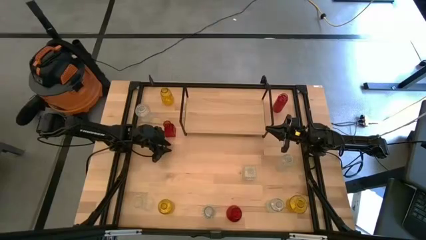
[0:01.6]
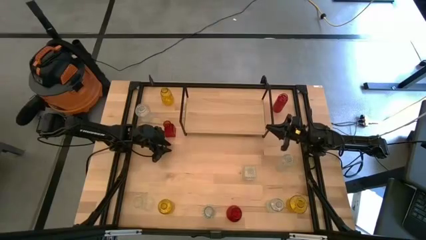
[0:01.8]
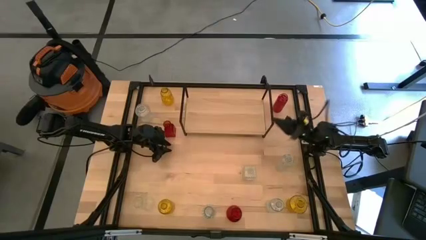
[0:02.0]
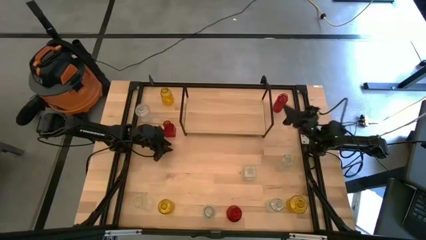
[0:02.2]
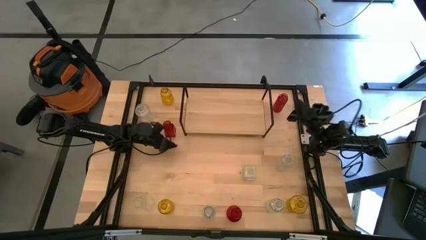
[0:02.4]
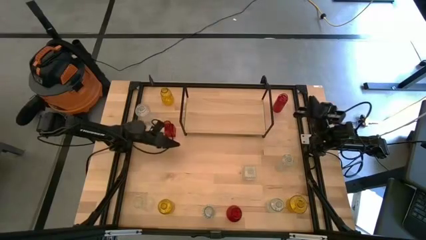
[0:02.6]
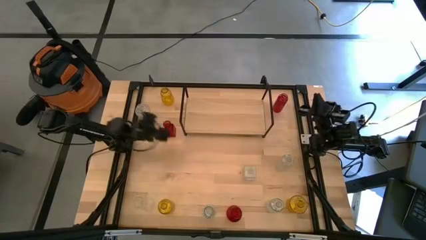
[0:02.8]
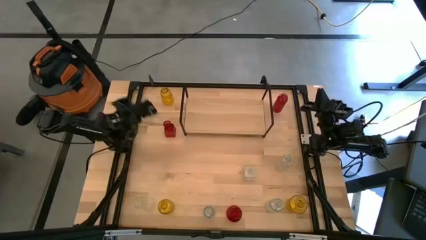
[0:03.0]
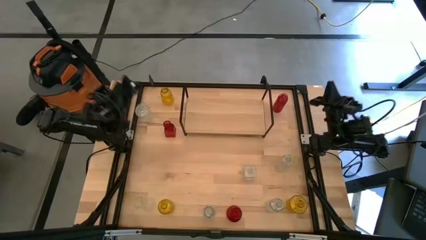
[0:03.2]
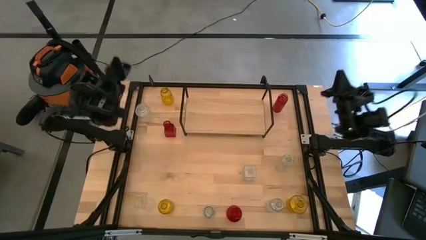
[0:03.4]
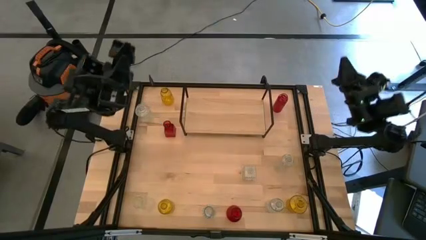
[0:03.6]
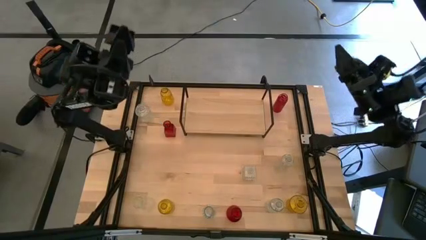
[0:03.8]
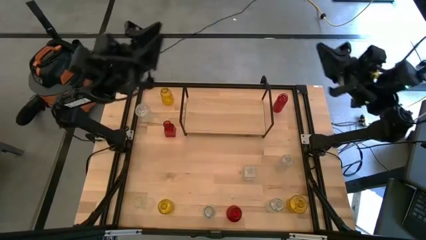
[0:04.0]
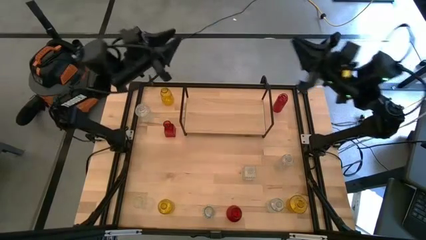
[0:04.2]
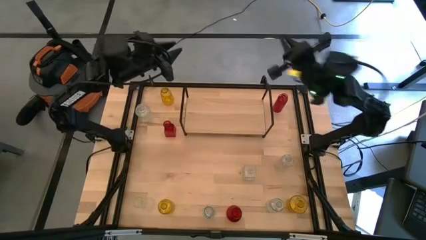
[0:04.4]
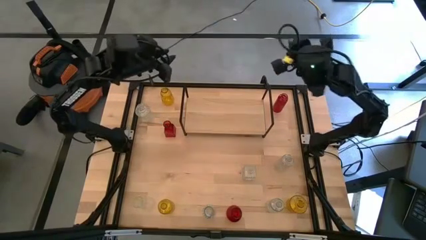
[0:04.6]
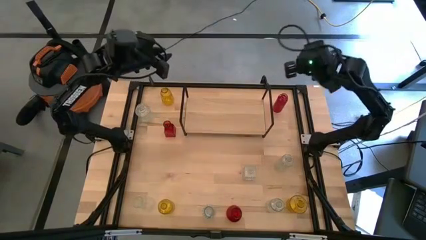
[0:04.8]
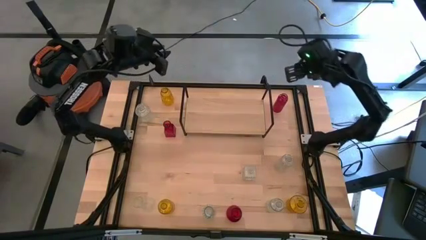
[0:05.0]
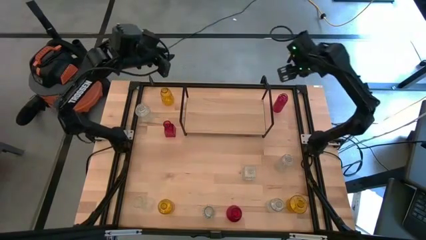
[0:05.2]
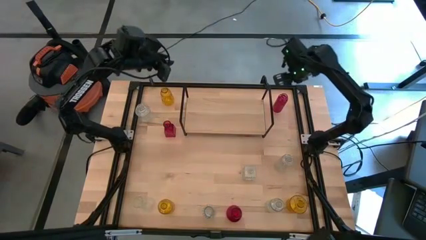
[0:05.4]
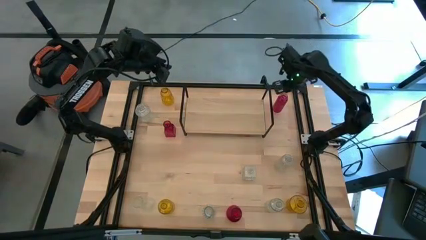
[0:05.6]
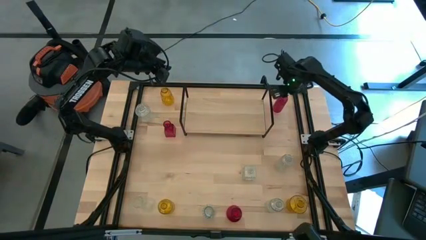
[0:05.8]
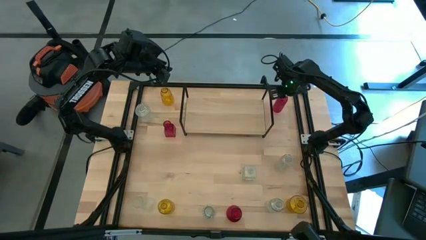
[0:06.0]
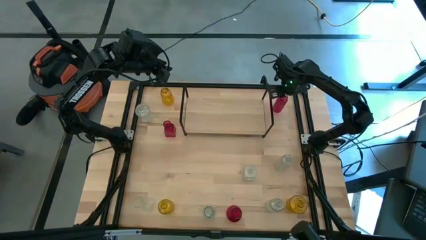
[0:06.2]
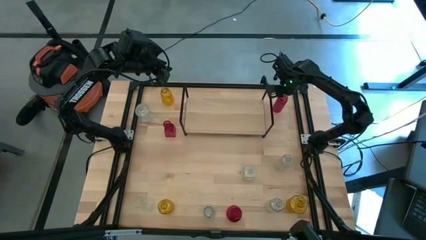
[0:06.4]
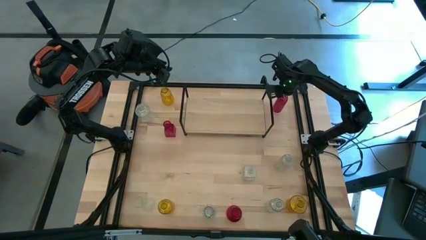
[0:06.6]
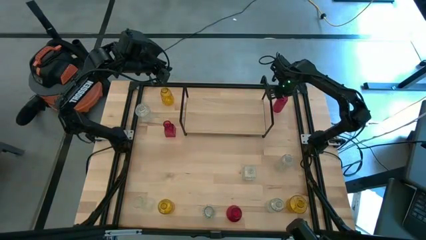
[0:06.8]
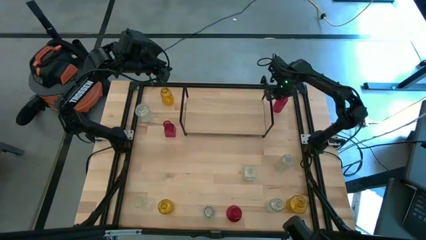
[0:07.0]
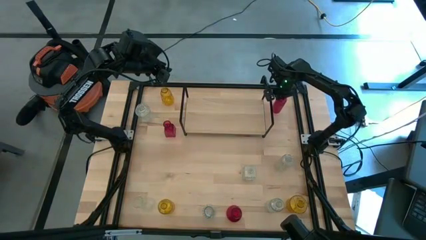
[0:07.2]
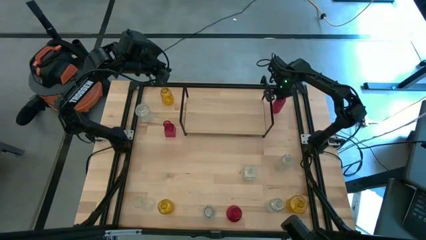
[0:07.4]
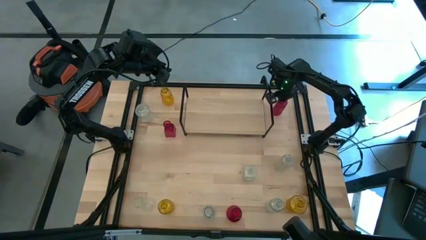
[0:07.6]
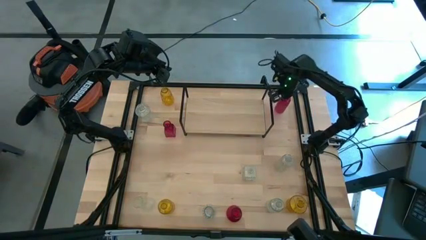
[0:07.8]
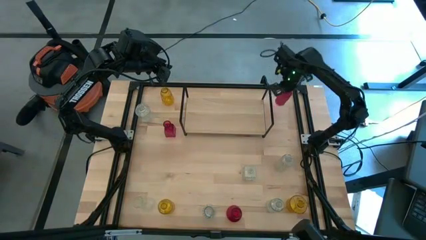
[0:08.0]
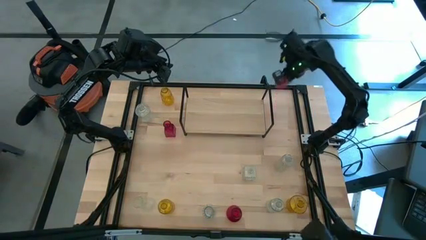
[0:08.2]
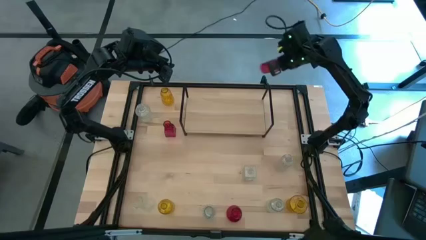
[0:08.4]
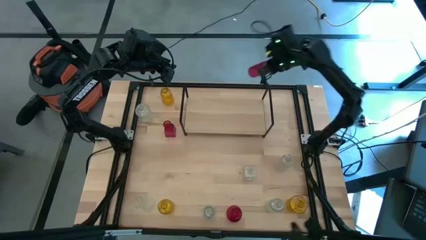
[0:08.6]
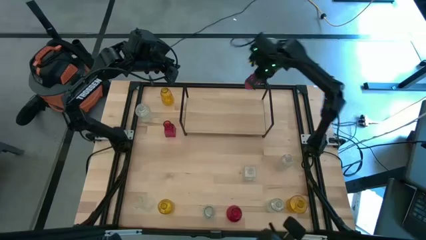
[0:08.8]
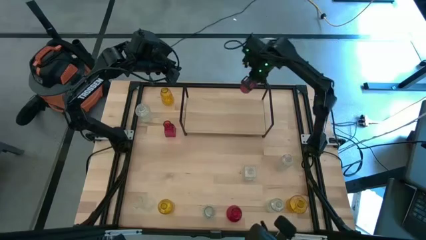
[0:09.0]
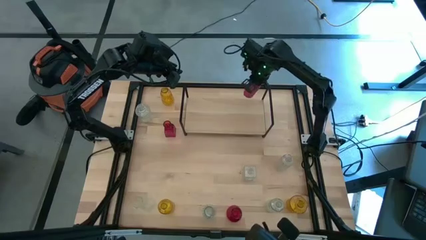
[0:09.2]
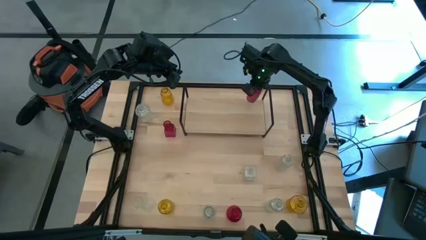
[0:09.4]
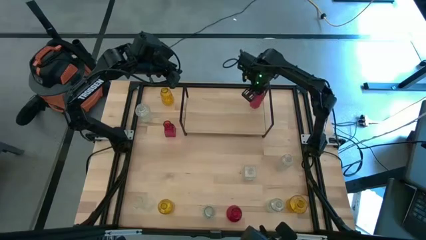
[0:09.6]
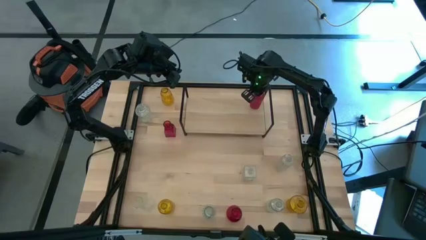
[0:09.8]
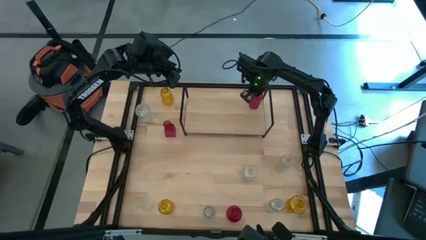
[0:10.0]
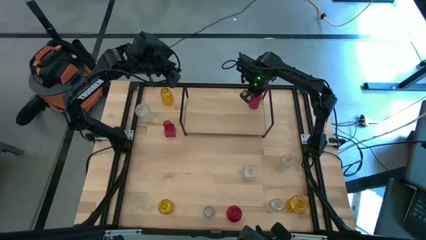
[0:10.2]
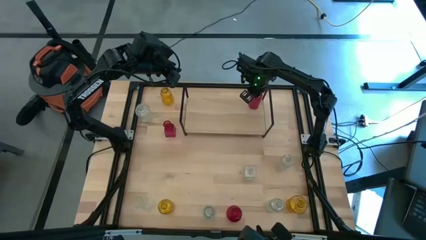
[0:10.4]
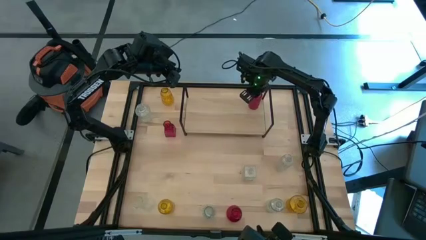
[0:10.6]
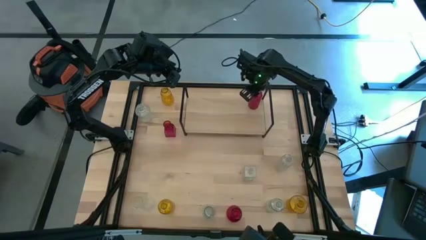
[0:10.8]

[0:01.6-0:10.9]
Task: sort vases onto shelf
Put the red vase on the shelf

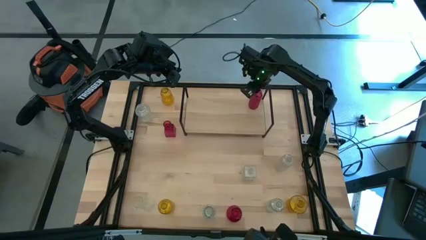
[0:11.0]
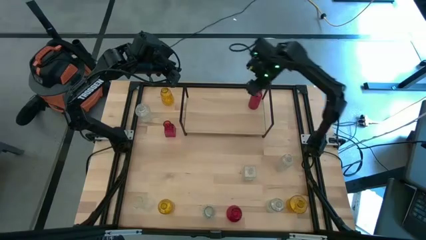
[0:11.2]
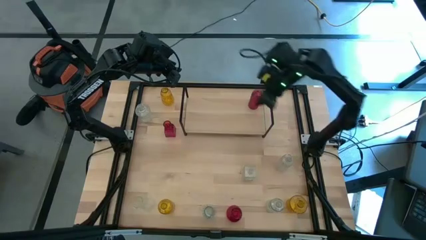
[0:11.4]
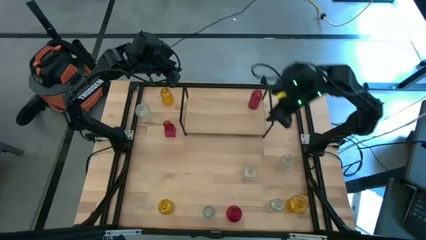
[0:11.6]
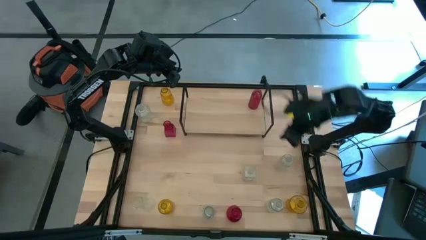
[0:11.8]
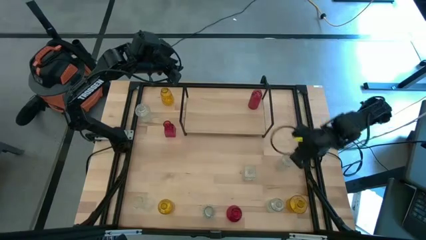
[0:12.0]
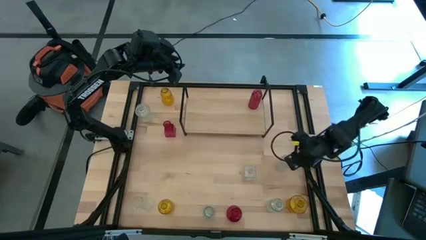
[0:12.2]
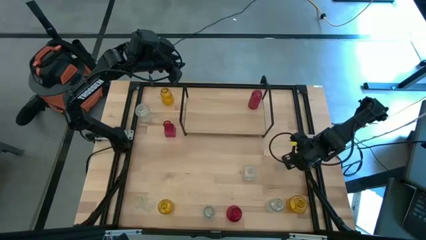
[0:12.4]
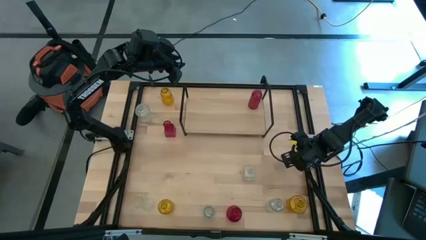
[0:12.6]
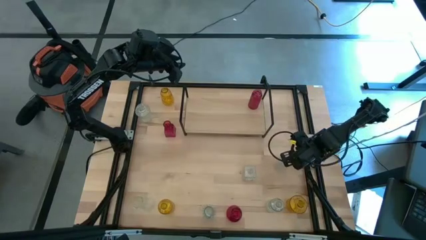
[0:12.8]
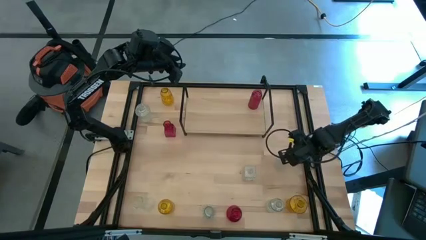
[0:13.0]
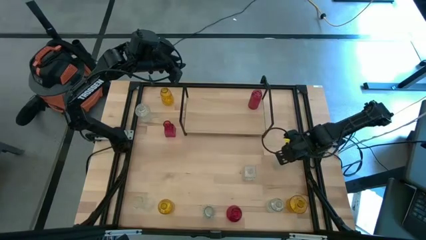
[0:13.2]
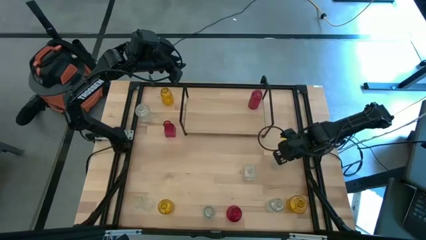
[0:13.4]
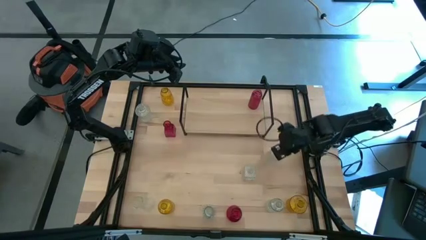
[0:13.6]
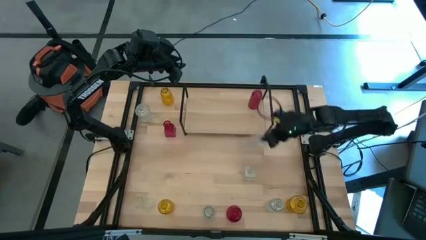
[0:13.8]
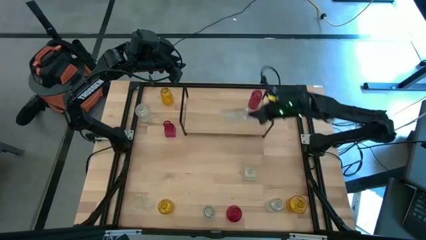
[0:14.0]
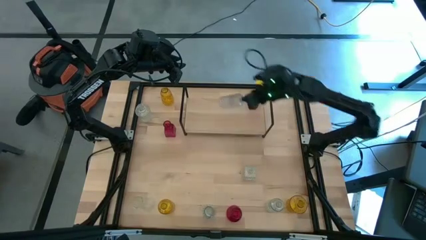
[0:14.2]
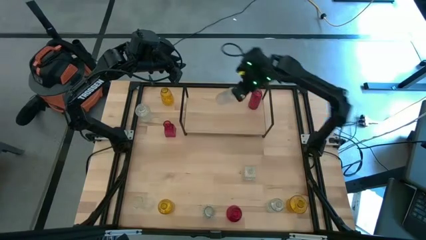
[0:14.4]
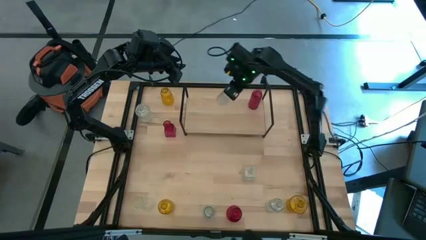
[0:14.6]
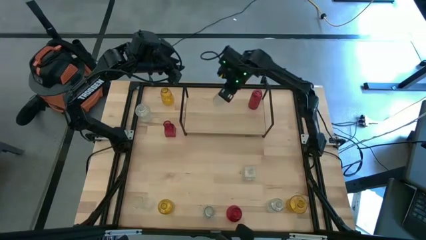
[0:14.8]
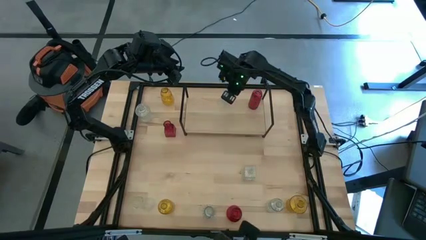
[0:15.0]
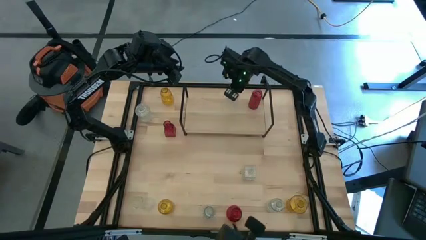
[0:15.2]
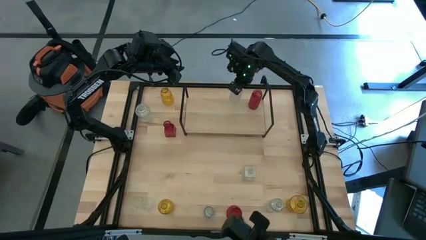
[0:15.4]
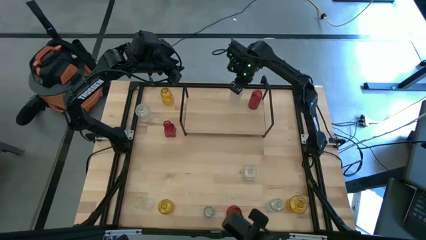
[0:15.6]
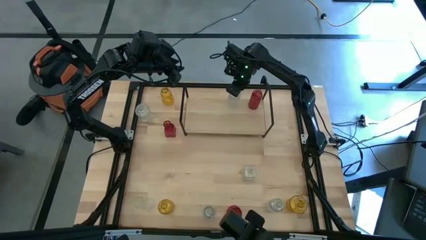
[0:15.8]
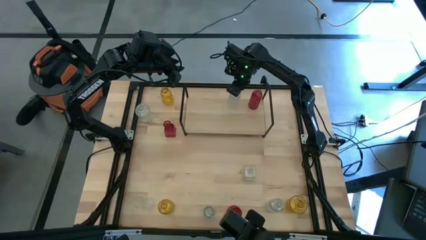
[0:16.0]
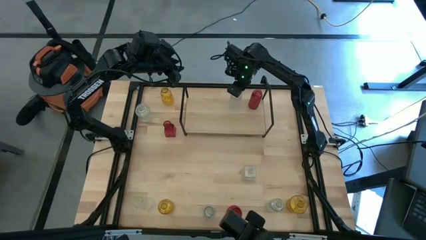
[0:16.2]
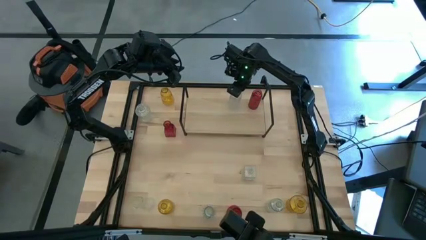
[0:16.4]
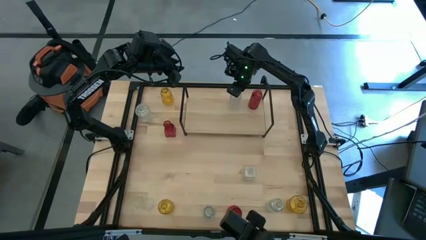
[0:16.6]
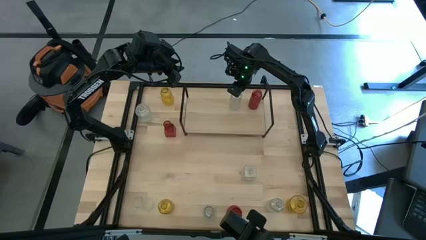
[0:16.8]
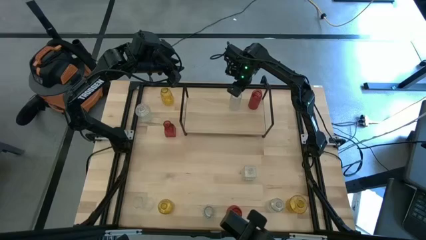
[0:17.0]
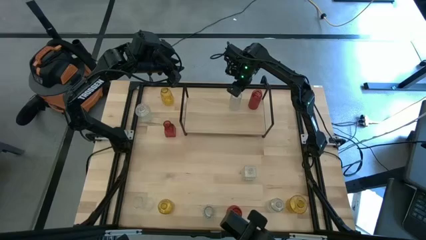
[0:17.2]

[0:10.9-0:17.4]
Put the transparent vase on the shelf
